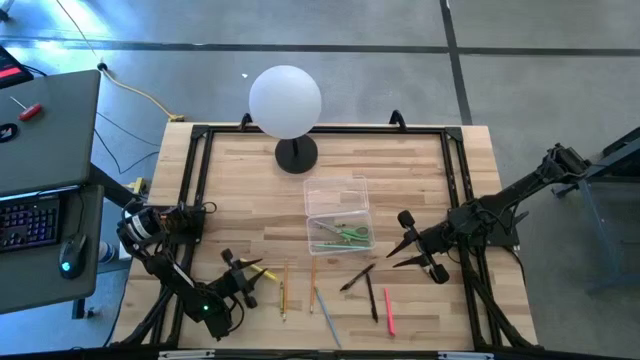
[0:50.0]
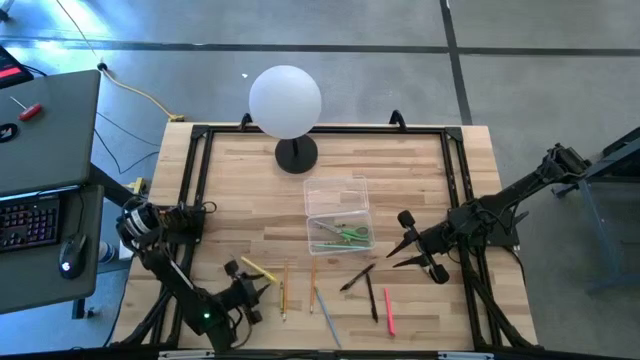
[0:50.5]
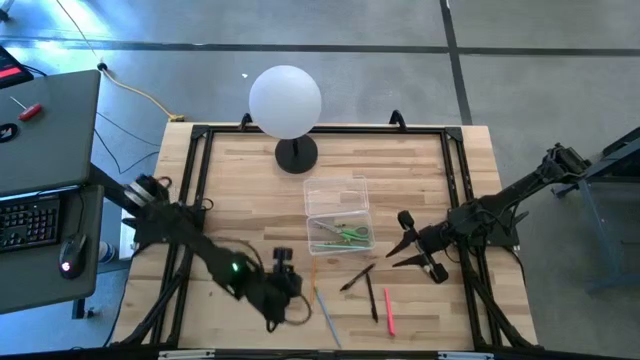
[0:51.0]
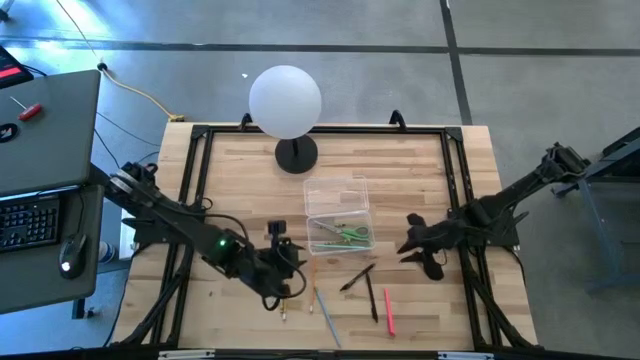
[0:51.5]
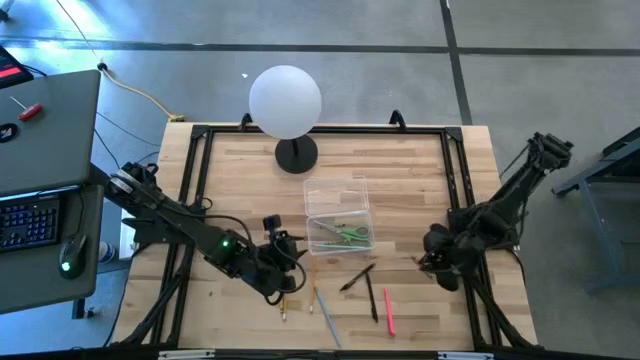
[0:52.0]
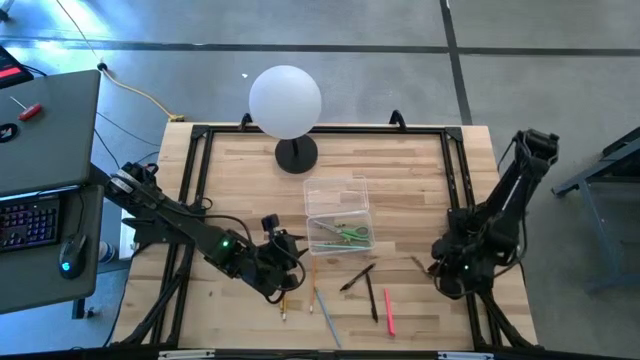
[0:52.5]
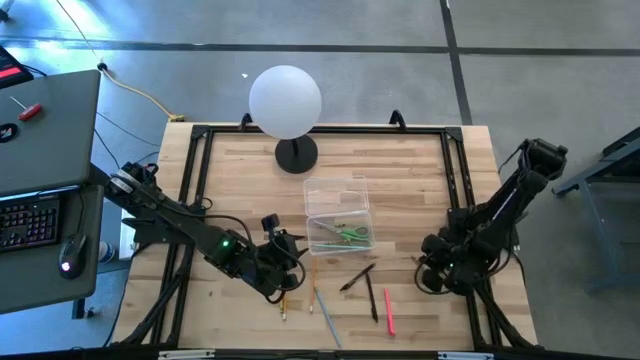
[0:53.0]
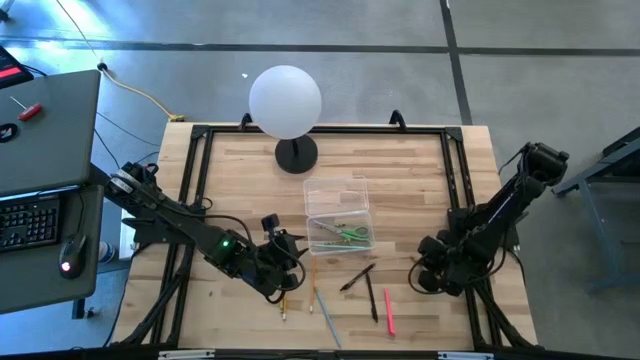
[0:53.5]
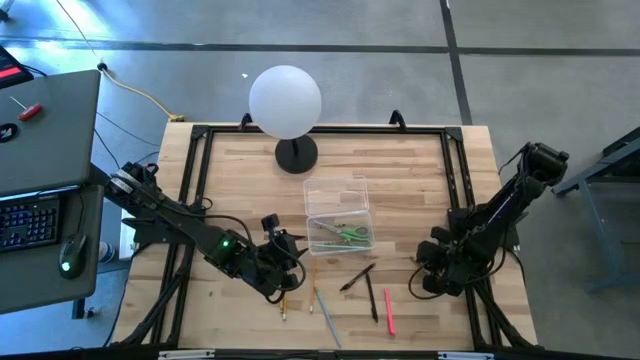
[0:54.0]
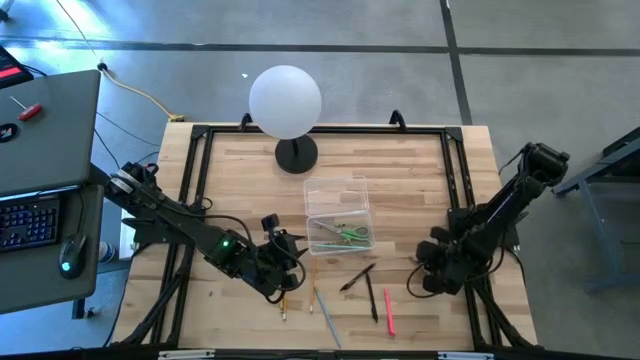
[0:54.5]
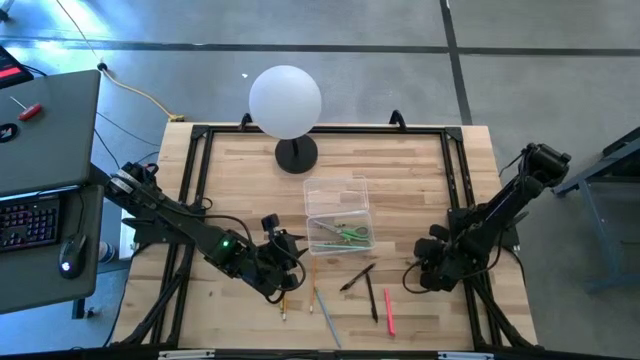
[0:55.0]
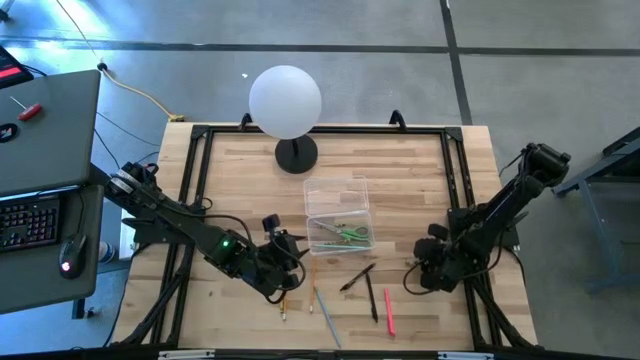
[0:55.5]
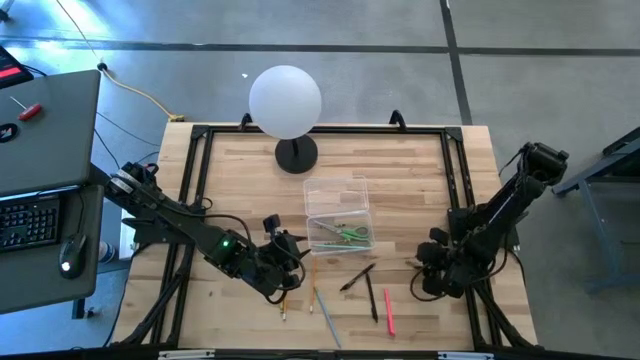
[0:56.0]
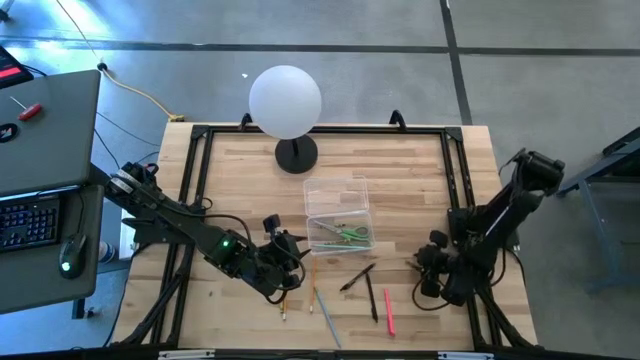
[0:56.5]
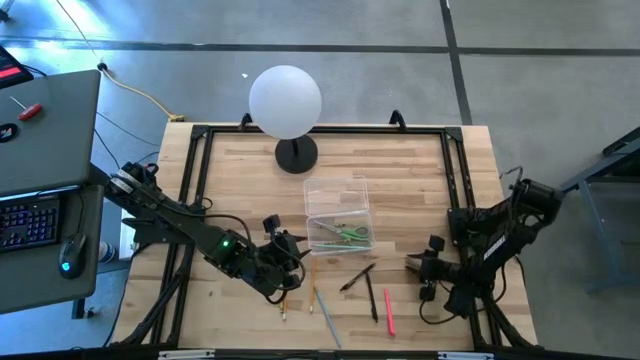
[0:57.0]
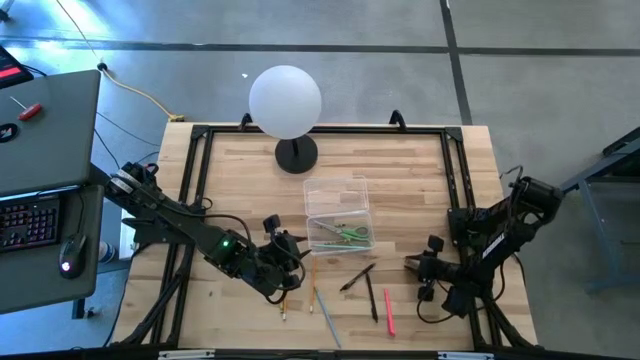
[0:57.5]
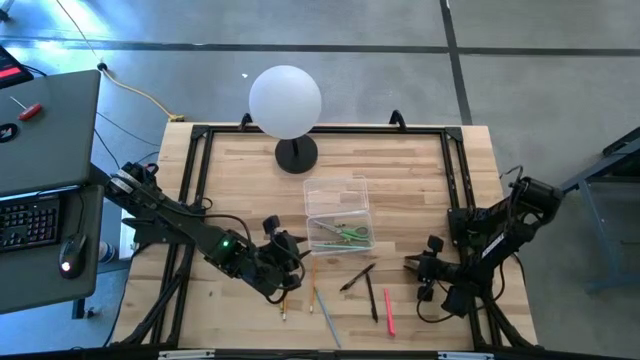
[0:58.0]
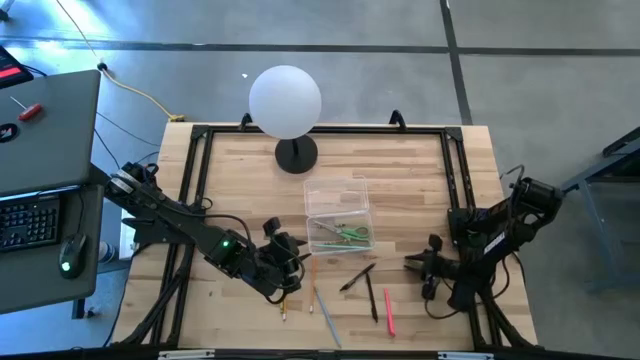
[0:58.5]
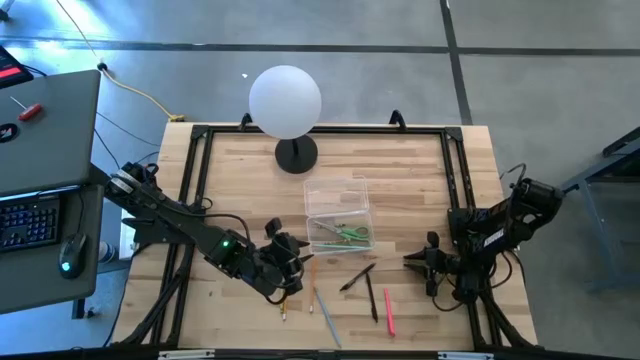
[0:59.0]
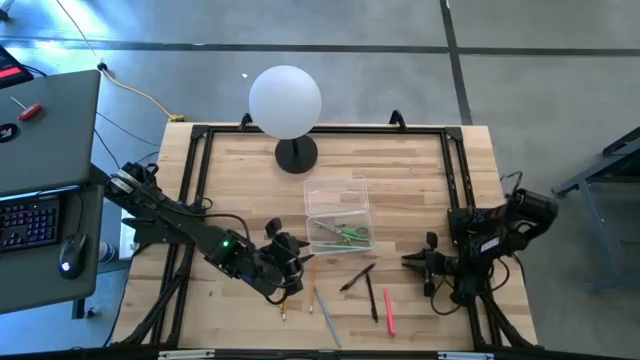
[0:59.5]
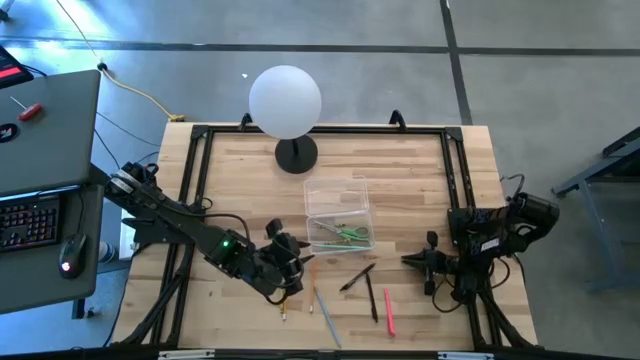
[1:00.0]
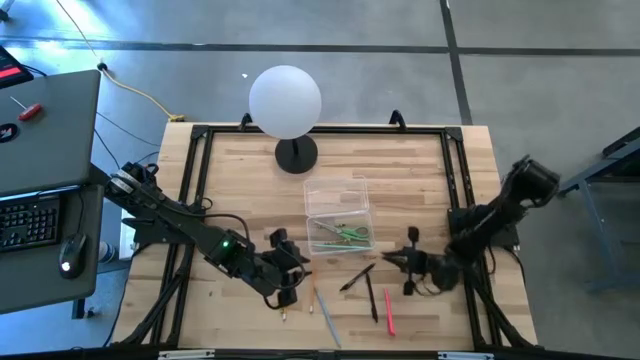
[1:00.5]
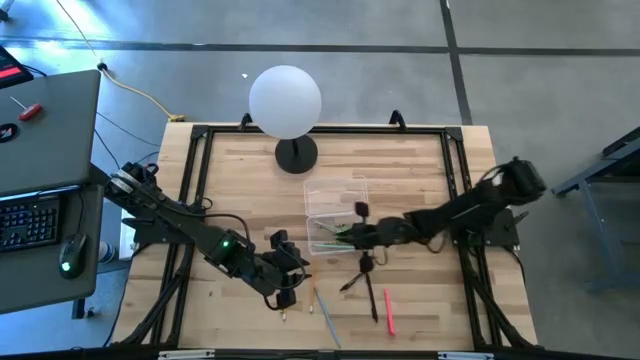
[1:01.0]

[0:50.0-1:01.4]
Task: Pick & place school supplies into a supply box
Put the right light green crayon into the transparent supply box

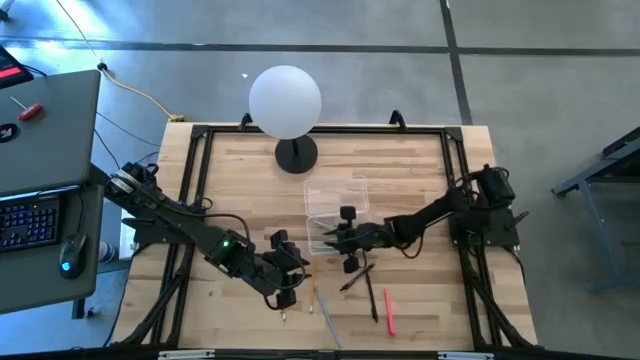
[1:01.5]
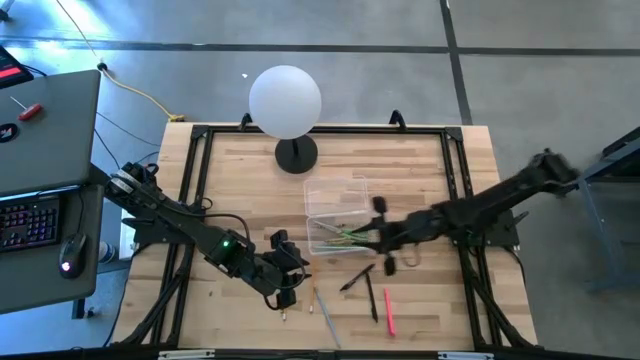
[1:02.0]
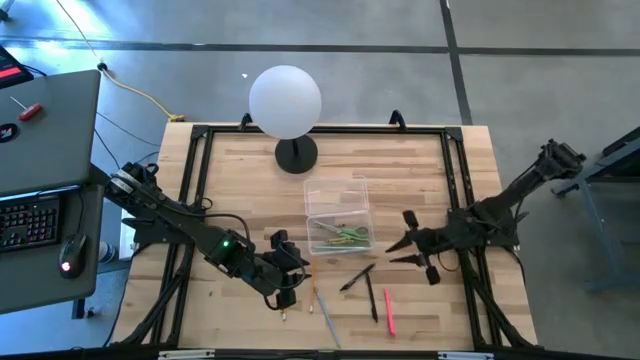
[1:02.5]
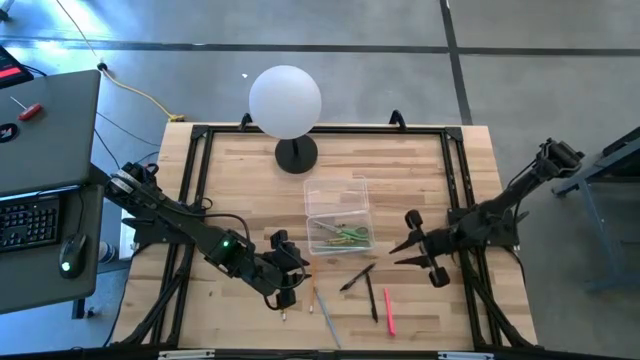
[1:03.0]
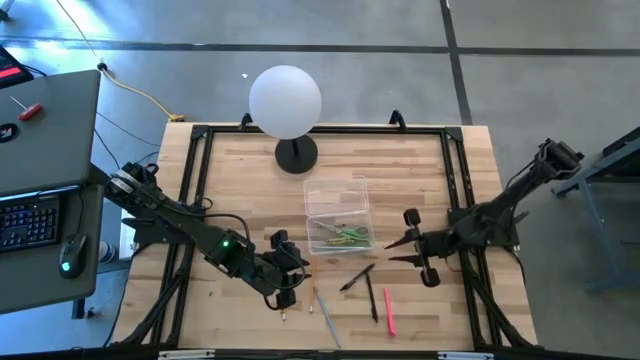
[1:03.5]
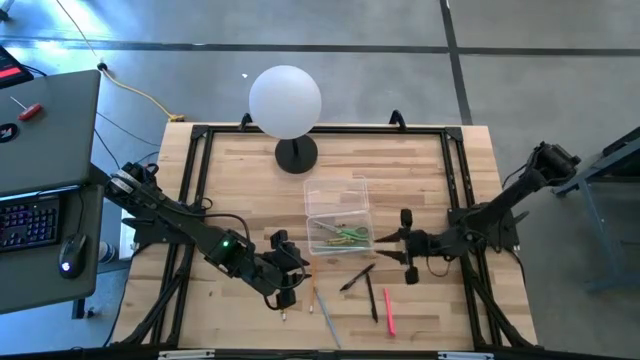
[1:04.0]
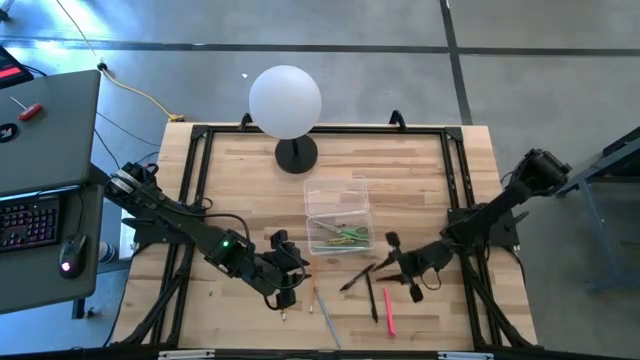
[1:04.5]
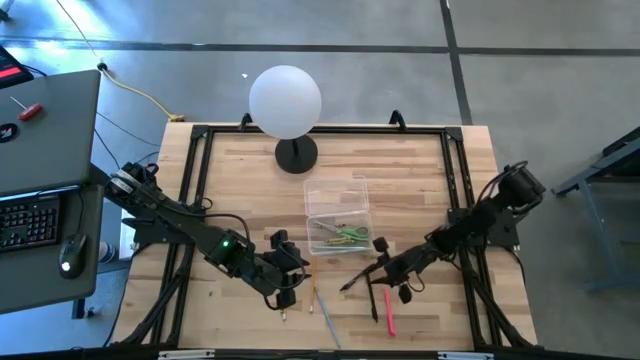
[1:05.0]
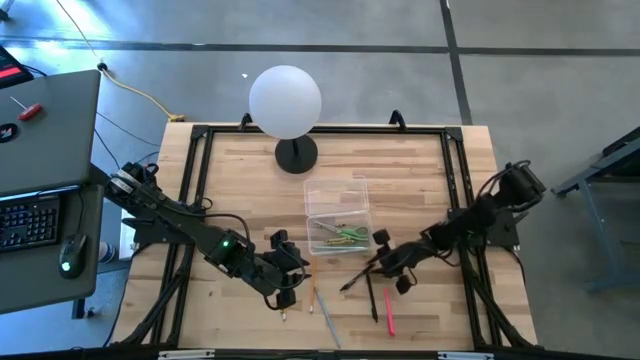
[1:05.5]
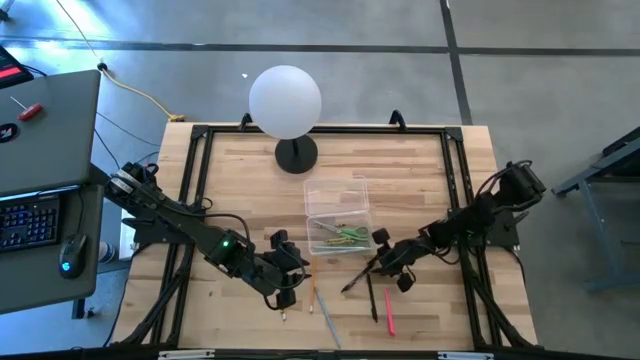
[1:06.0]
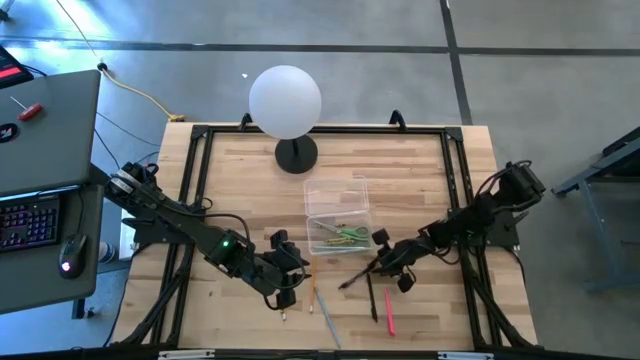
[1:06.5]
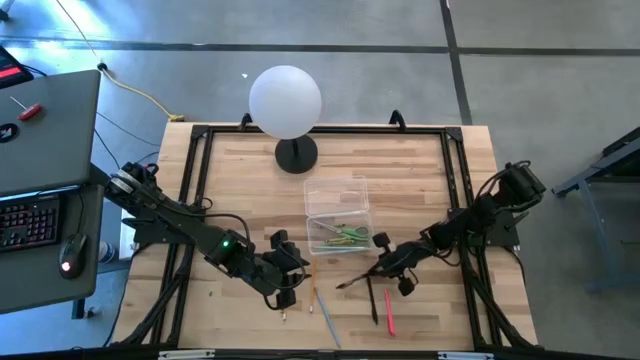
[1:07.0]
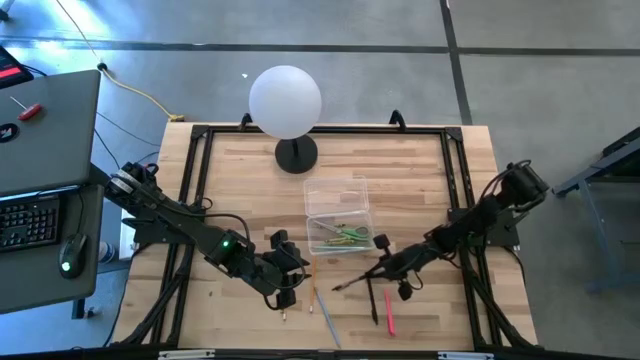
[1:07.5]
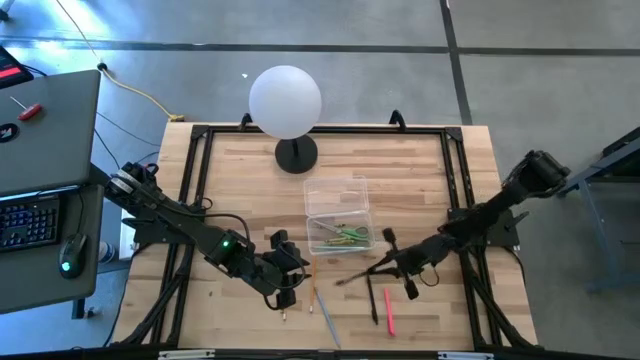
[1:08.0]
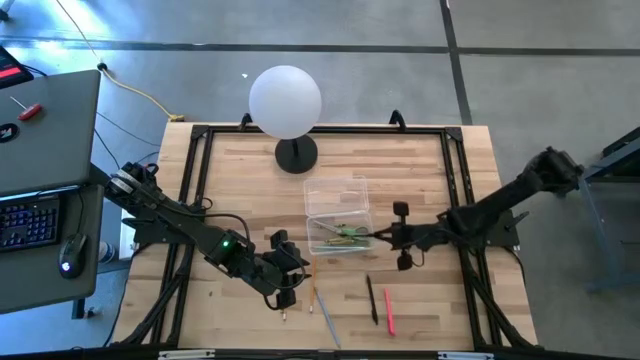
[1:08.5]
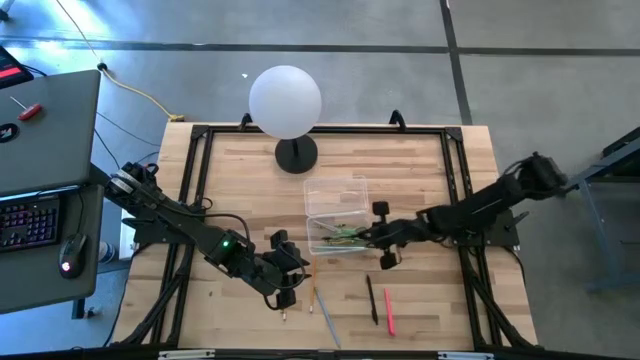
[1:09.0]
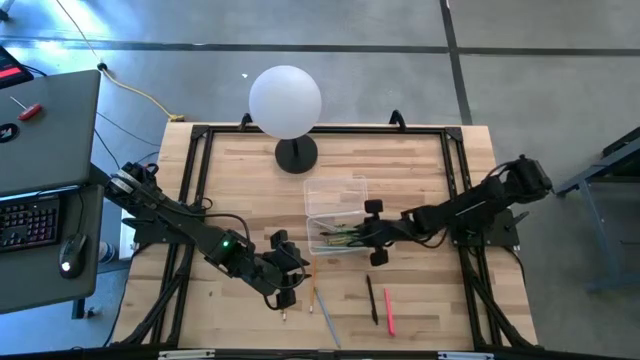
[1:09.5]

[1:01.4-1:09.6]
Put the black transparent pen into the transparent supply box

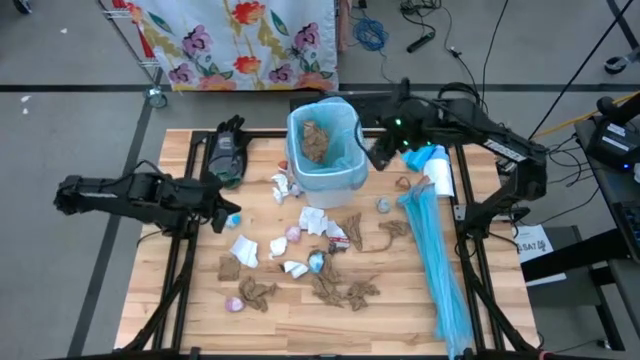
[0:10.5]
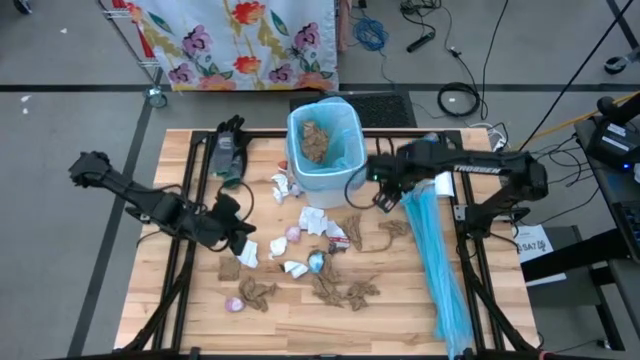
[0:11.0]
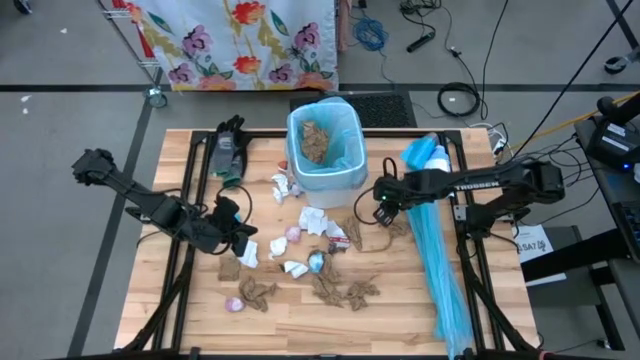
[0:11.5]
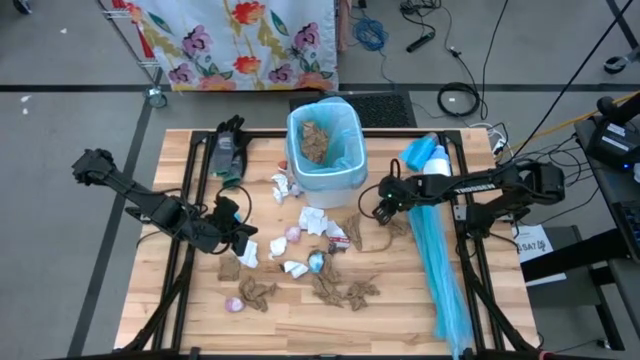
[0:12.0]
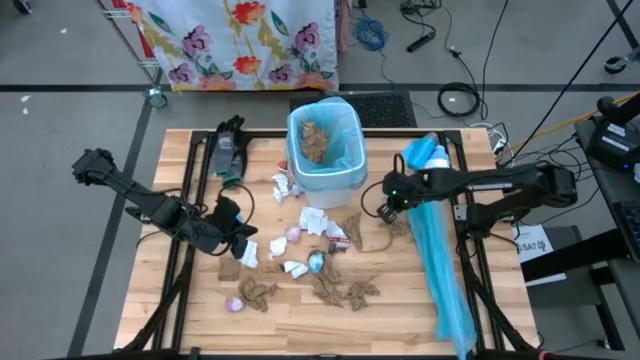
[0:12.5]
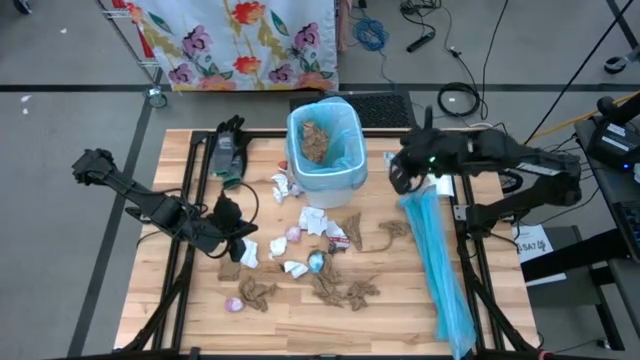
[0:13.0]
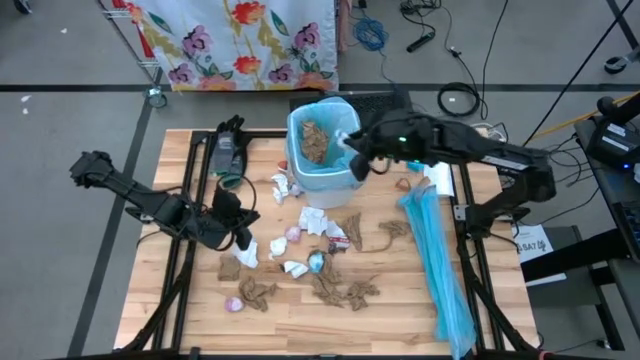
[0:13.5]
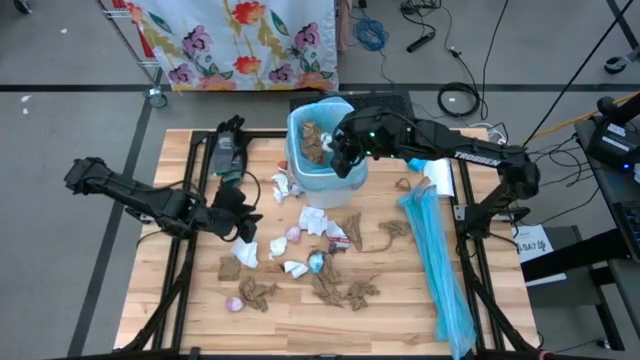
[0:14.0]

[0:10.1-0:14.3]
Task: place trash/remove bag and relplace
Put the crumpled blue trash bag into the trash bin
